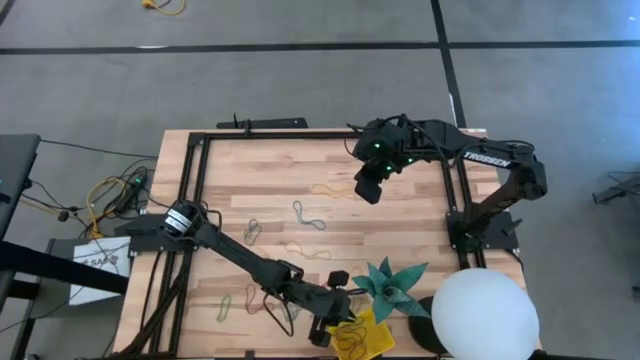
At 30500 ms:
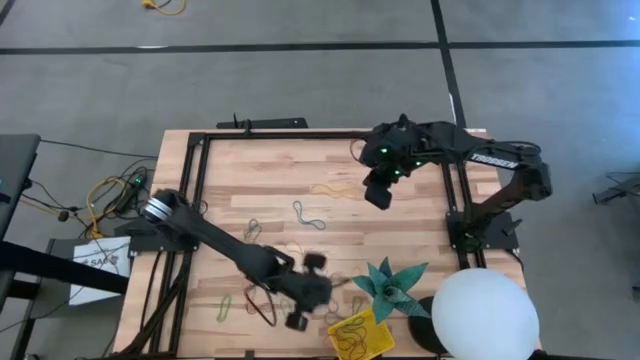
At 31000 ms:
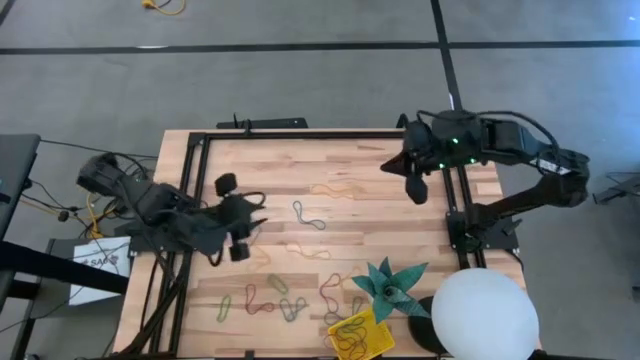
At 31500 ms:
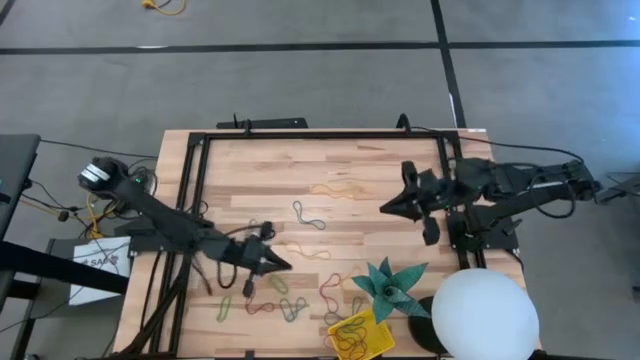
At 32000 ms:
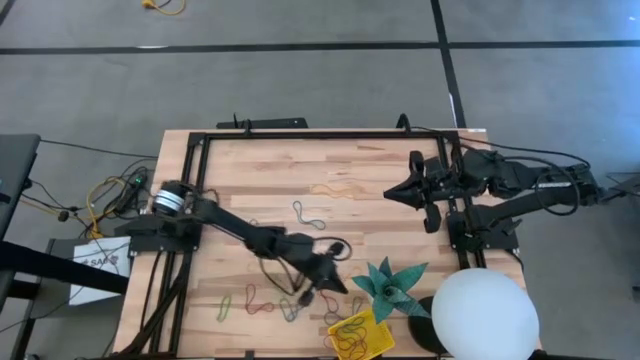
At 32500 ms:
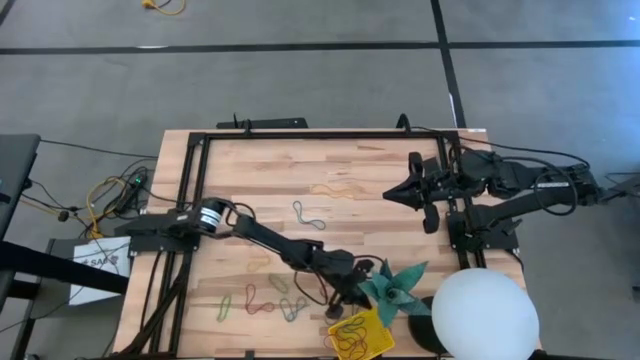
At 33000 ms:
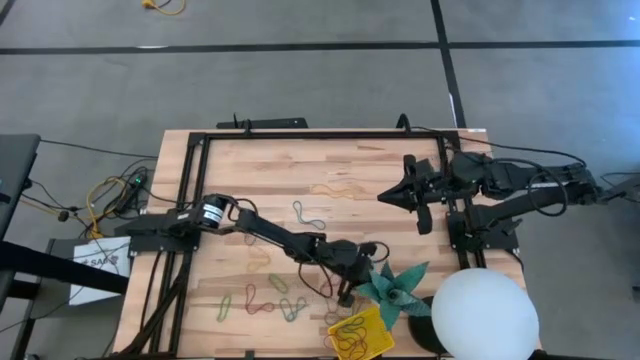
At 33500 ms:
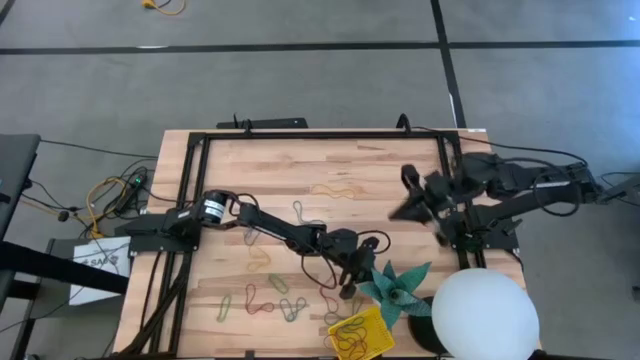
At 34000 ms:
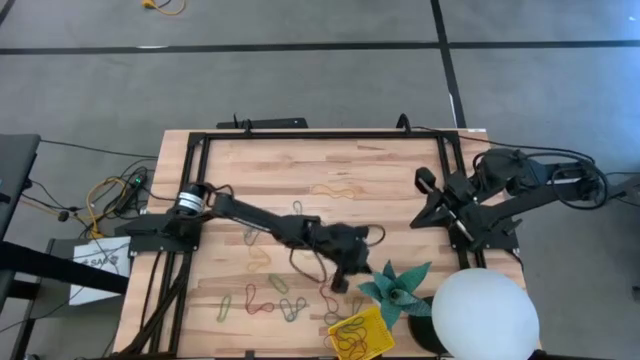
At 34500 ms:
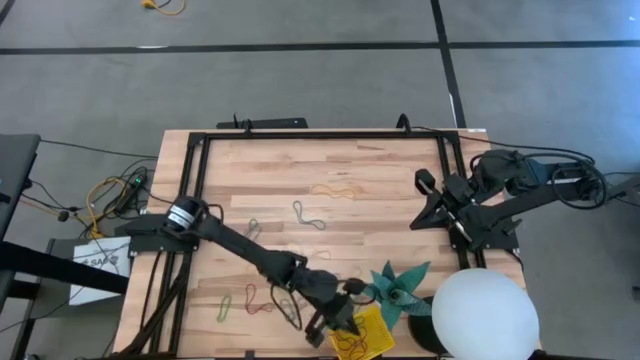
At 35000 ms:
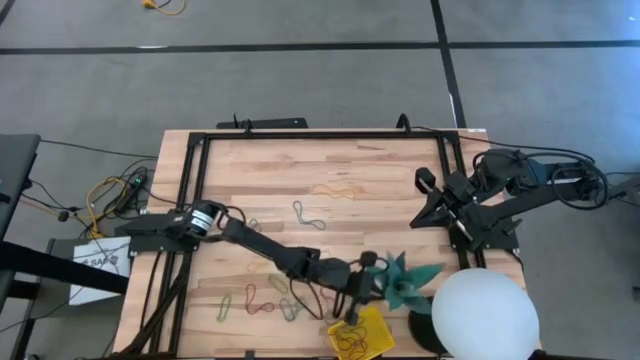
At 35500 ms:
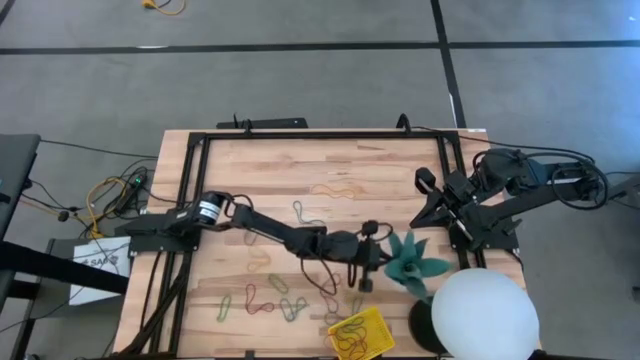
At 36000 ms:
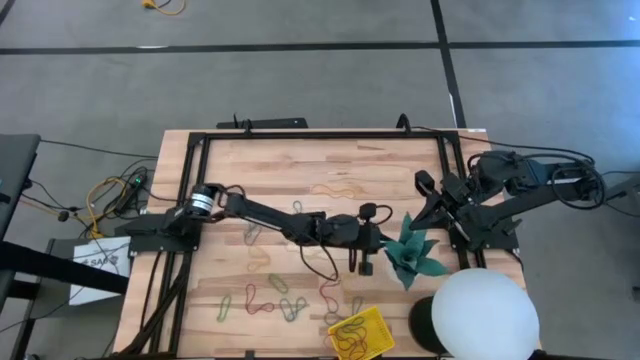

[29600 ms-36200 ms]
Task: Pick and place items into bin
Adjust the plant pot

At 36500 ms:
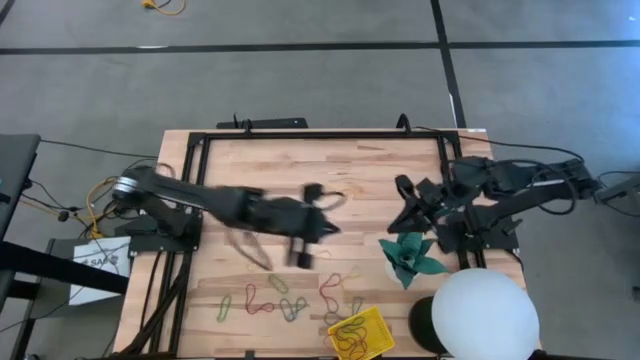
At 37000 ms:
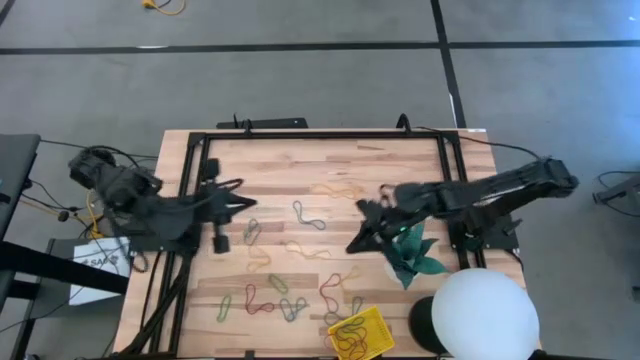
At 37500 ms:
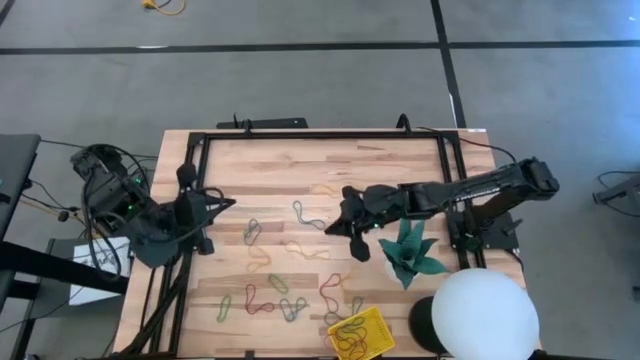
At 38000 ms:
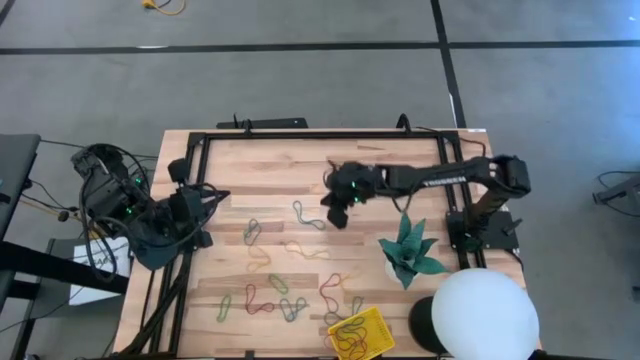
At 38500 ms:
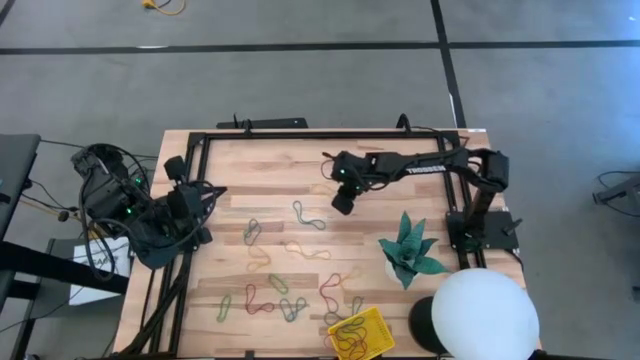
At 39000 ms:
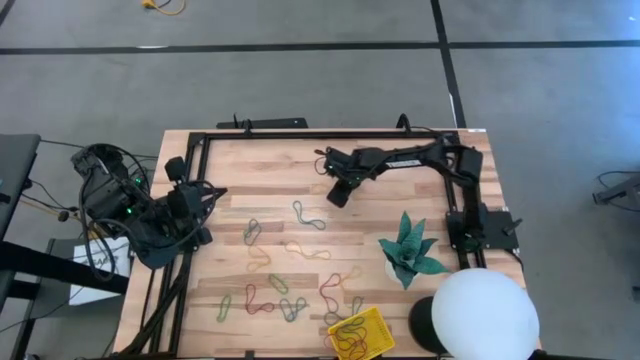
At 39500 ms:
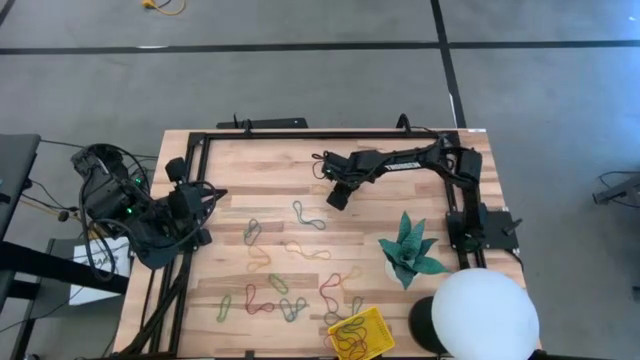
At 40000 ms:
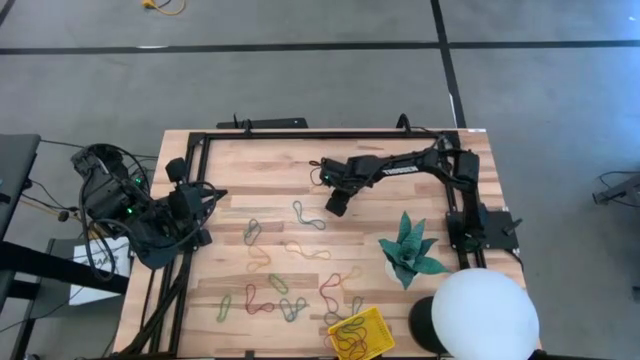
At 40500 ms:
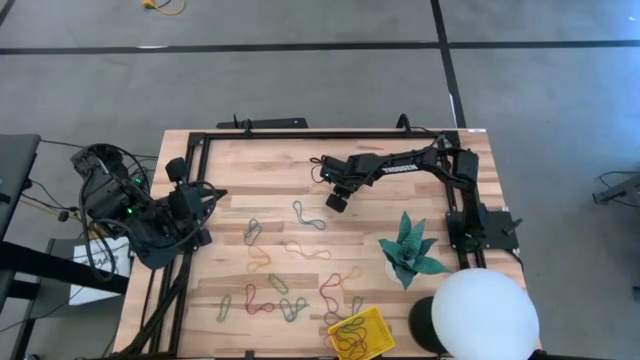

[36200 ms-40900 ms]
Put the yellow rubber band into the yellow bin

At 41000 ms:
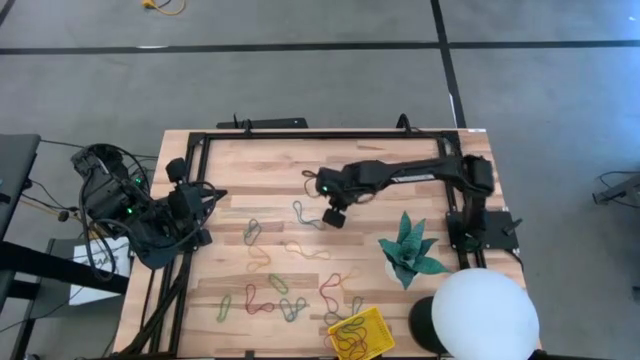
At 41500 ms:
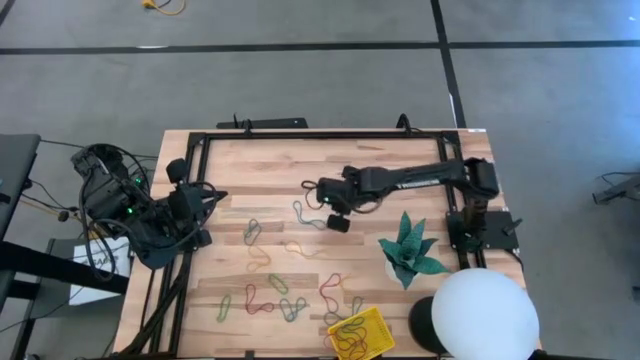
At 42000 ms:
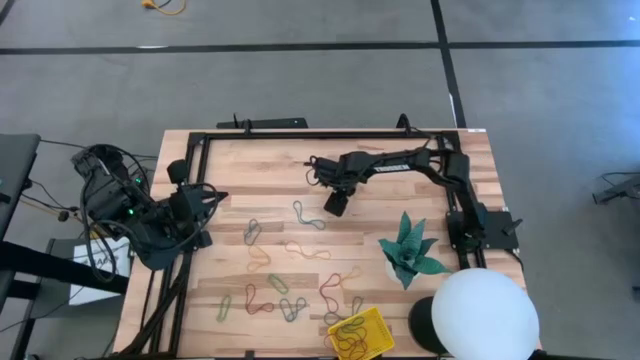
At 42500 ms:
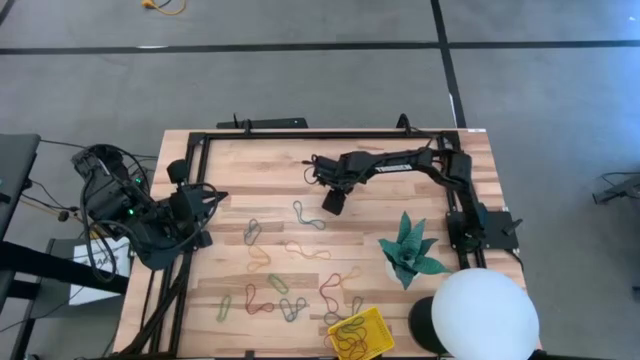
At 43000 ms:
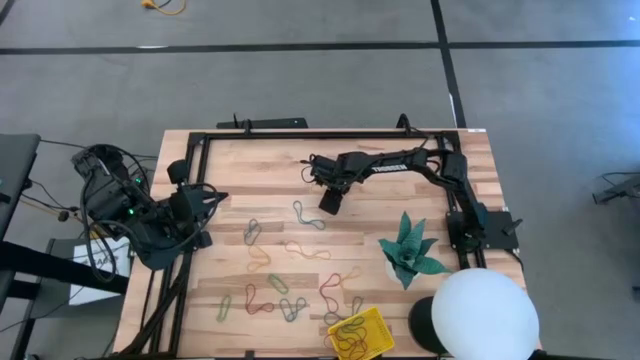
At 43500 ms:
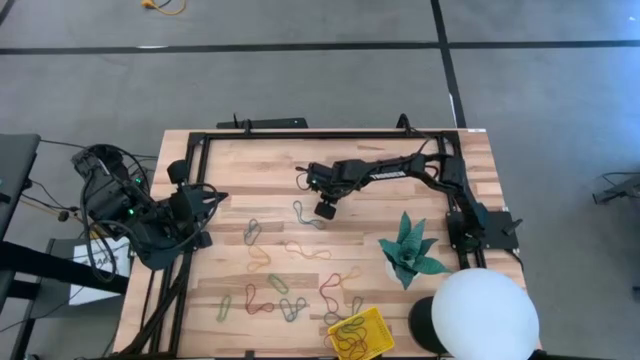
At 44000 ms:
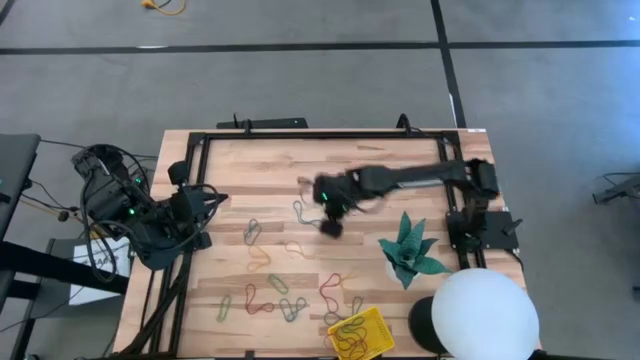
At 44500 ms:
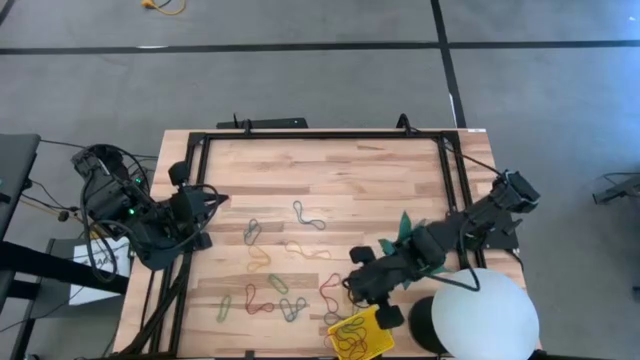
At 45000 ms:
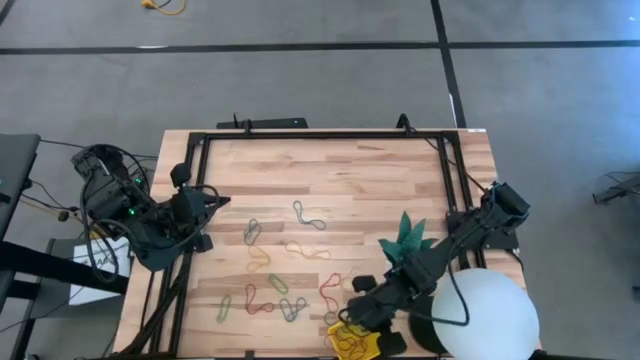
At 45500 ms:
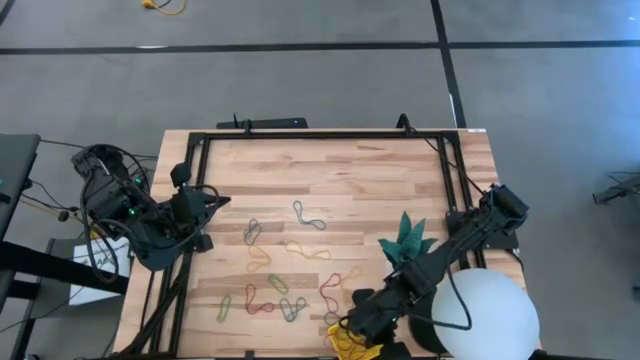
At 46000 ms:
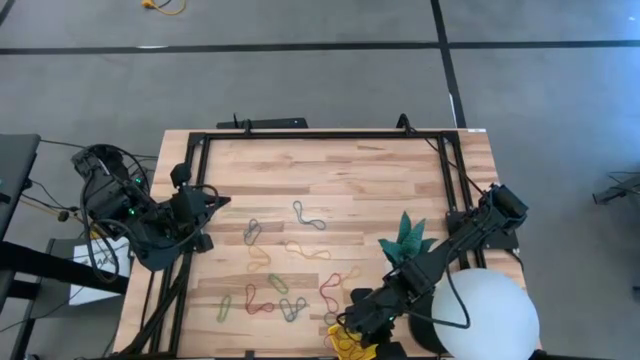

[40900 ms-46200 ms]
Put the yellow rubber band into the yellow bin

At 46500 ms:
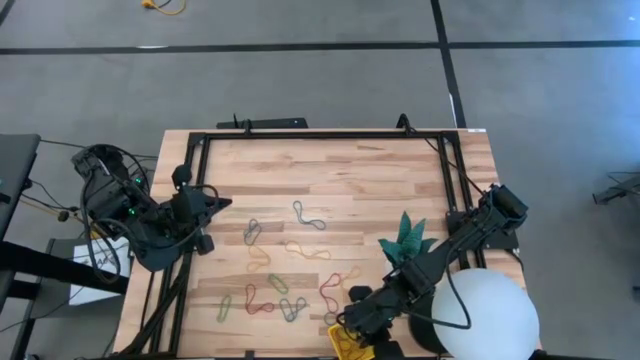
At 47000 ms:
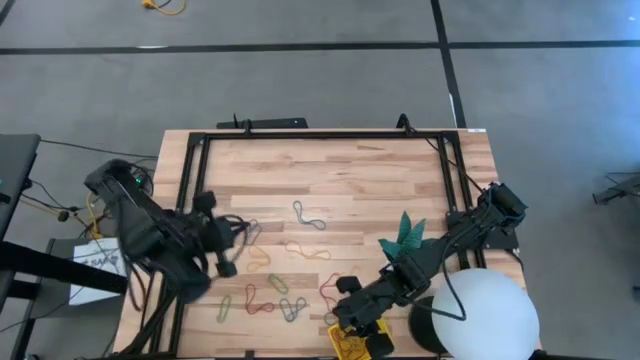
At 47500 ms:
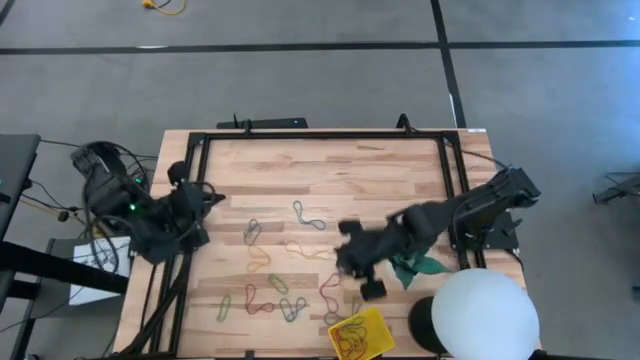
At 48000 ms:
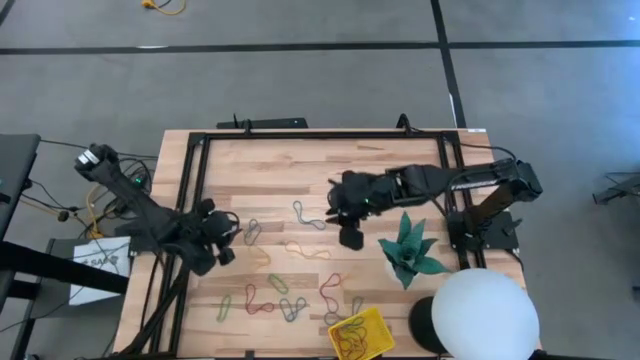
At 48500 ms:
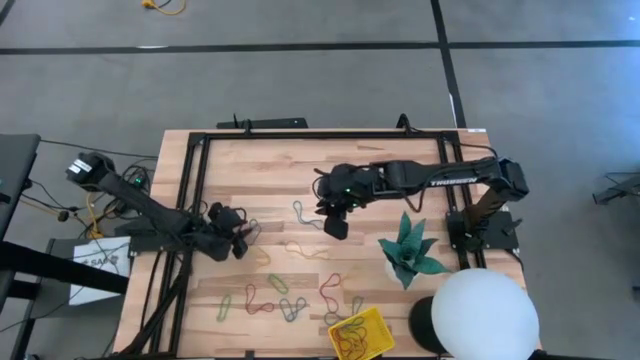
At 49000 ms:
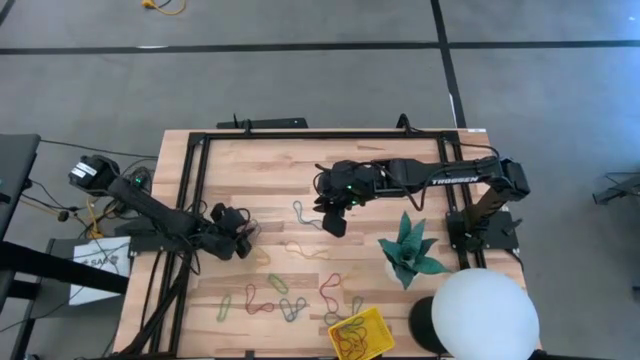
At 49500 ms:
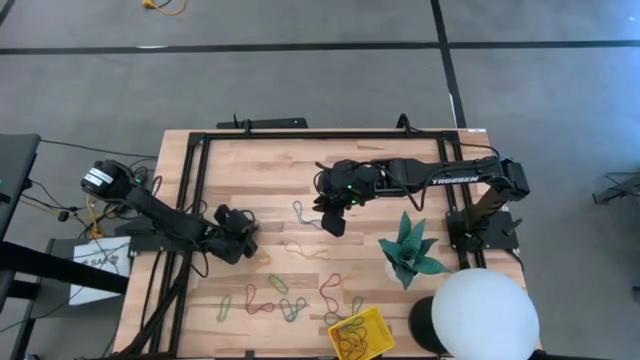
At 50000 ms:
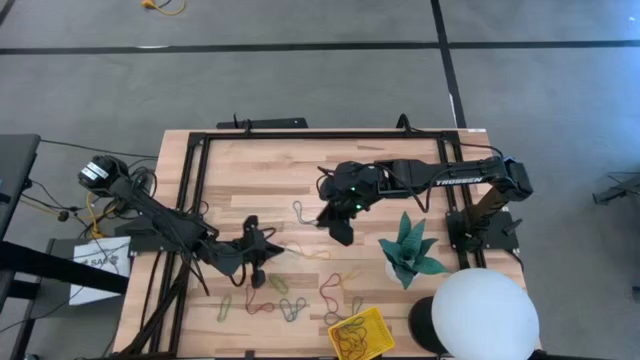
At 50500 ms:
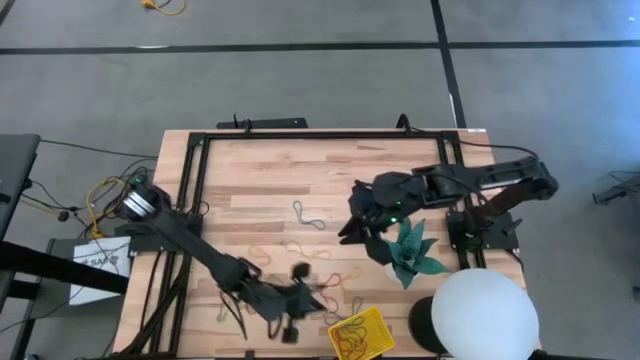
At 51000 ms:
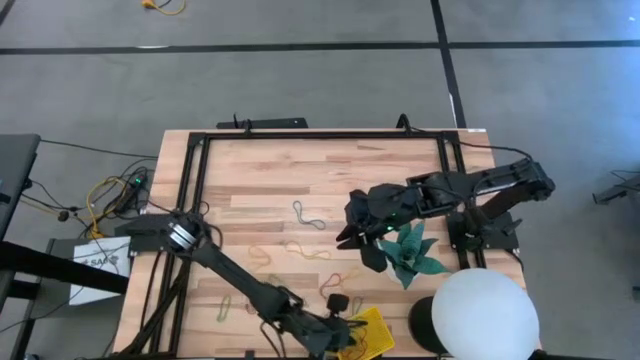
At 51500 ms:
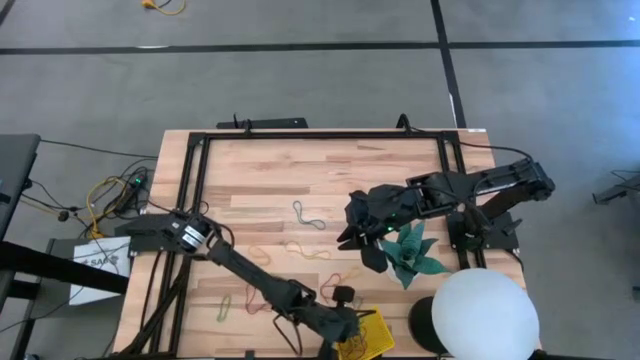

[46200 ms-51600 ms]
Put the blue rubber band into the yellow bin
